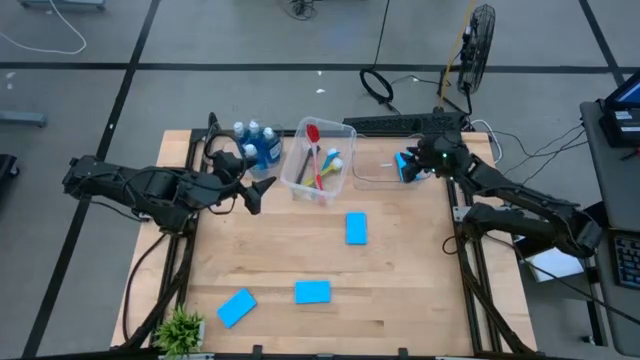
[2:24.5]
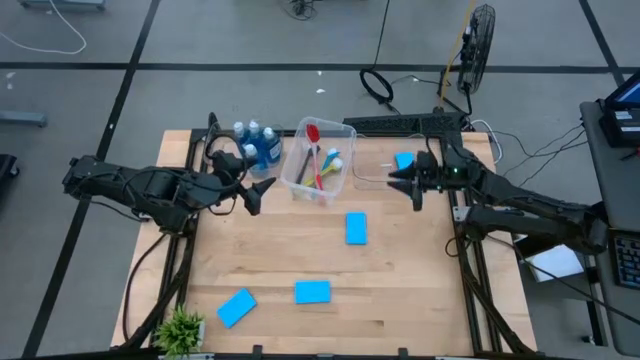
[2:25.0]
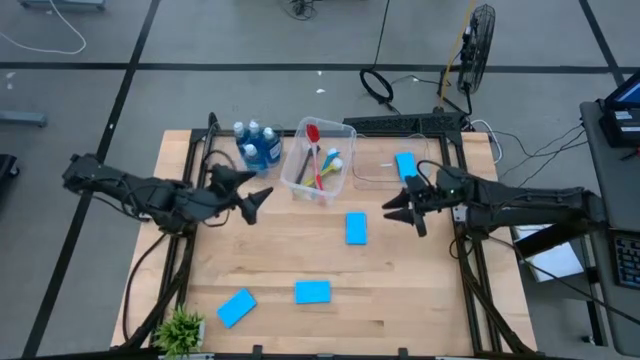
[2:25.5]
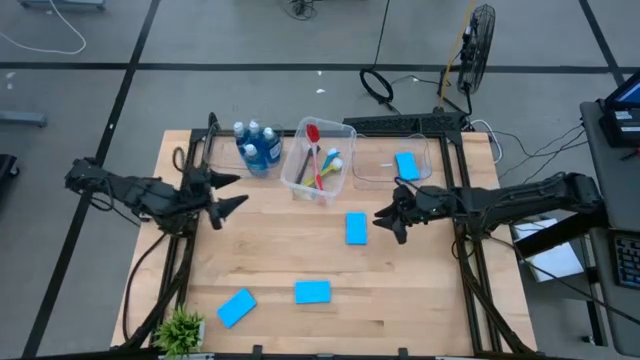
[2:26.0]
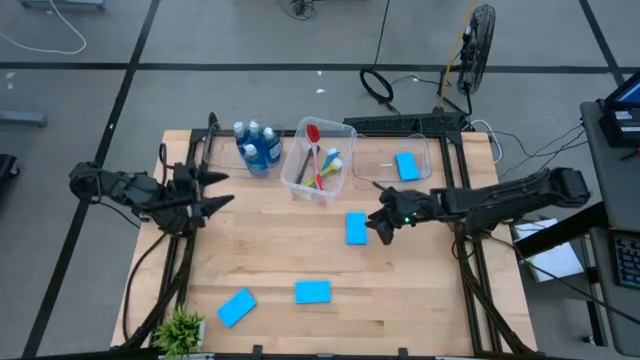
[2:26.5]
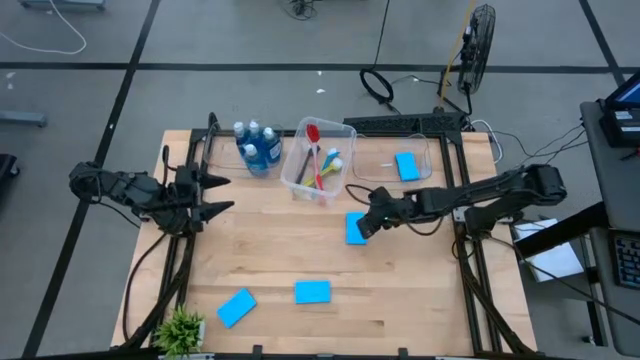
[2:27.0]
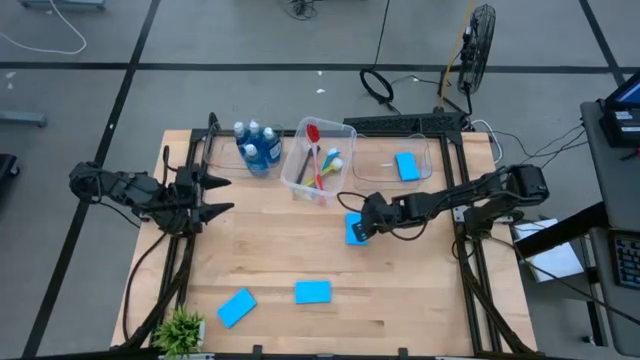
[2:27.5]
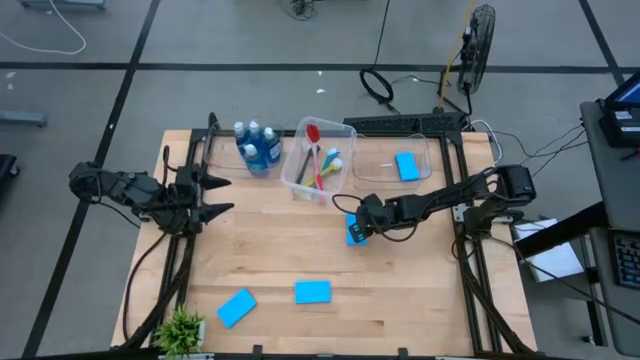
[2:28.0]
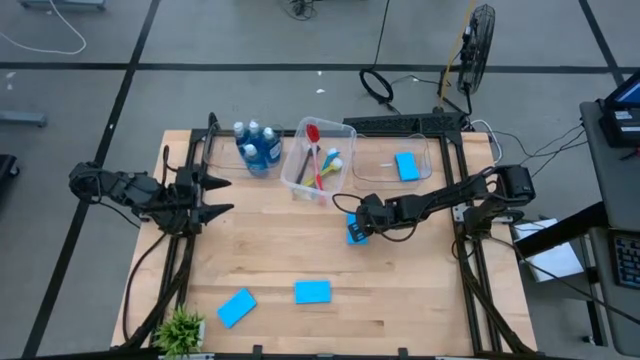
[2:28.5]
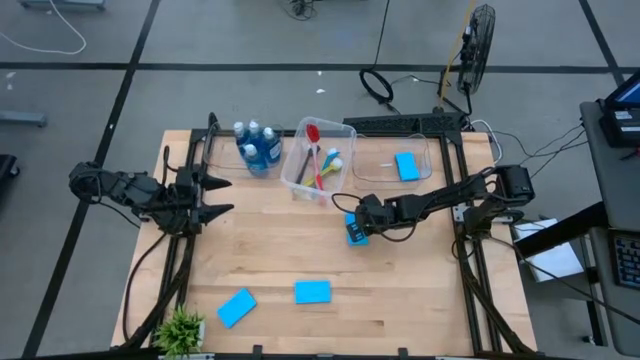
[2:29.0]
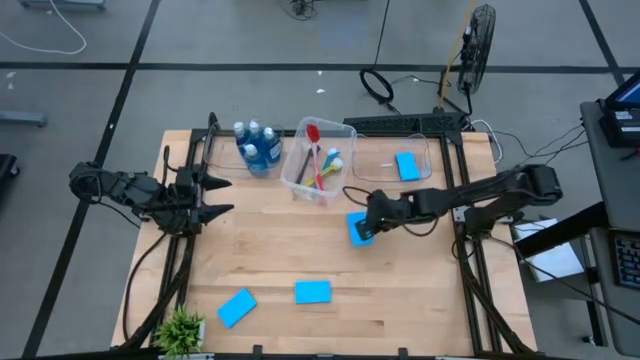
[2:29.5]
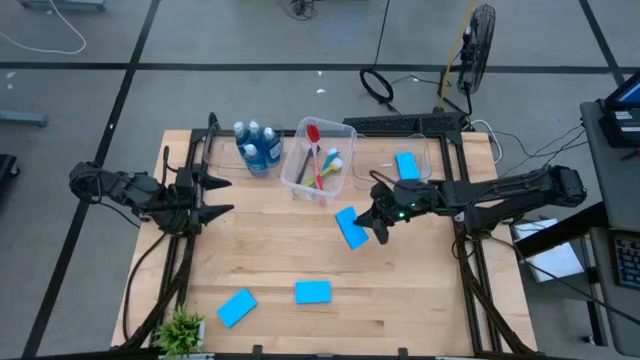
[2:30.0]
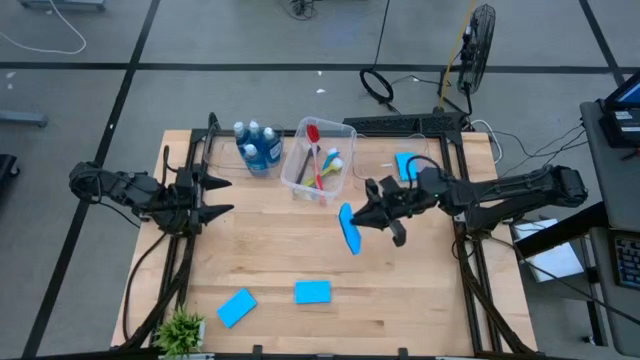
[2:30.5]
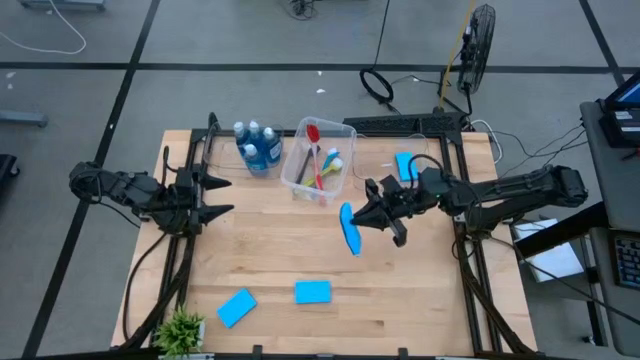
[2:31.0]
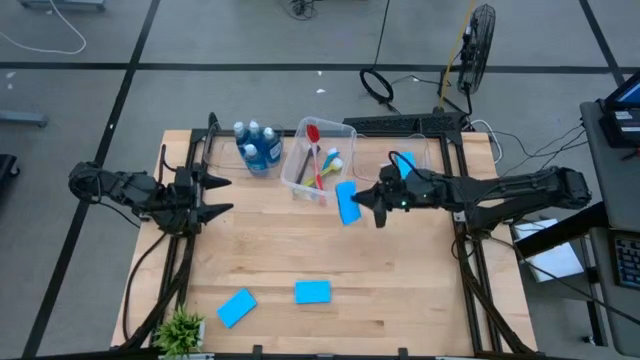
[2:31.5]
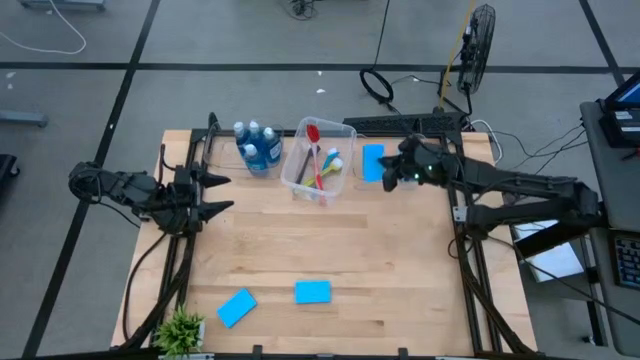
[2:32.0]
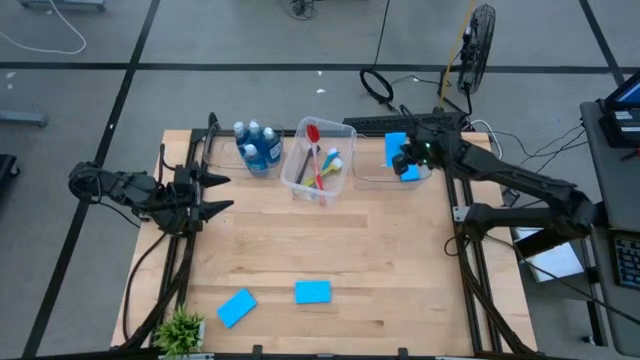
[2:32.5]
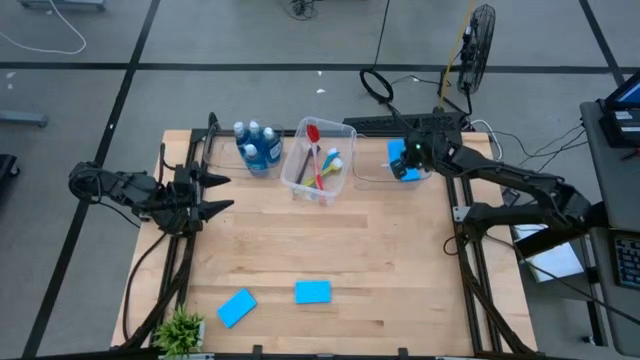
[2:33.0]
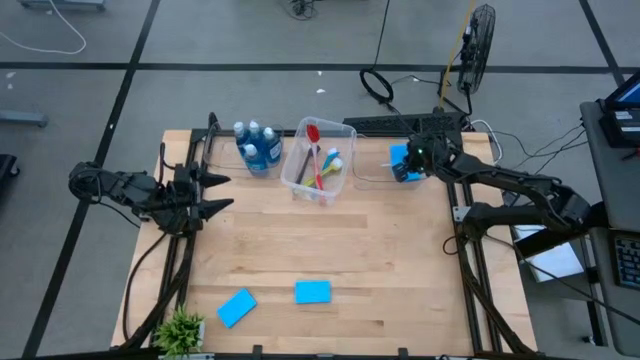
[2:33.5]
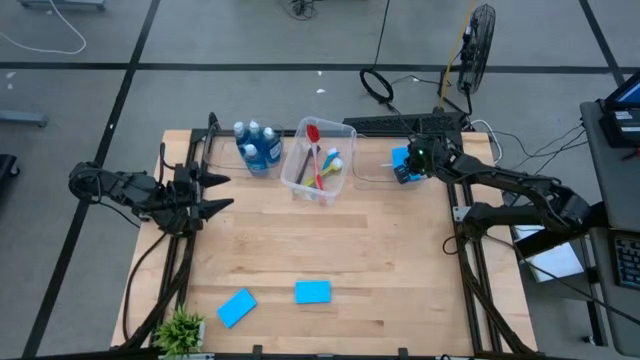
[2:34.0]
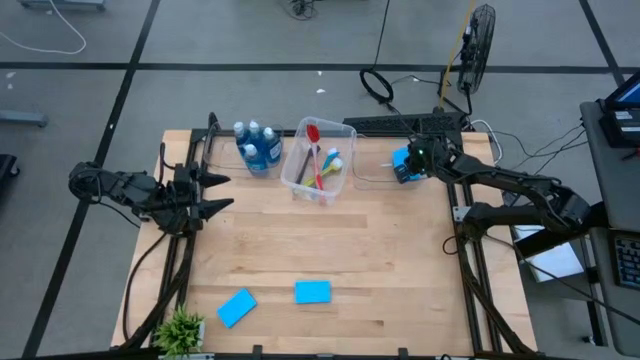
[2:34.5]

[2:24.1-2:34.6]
Task: Pick & Place Kitchen Sink Supplies
Put the blue sponge into the right transparent bin

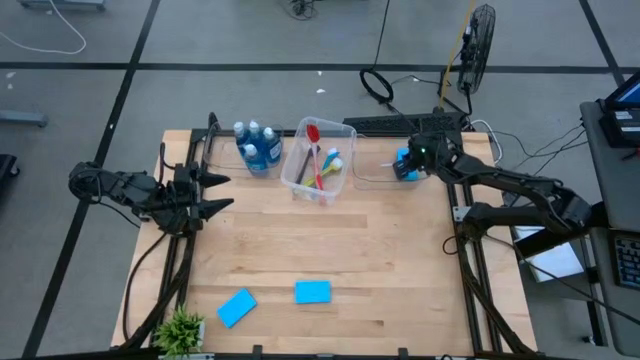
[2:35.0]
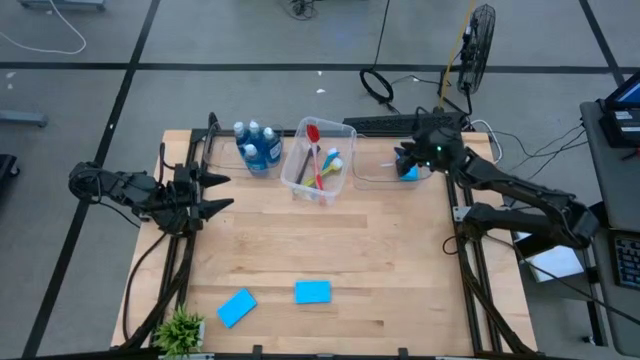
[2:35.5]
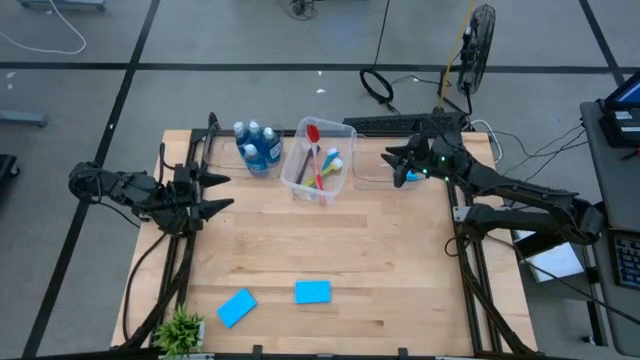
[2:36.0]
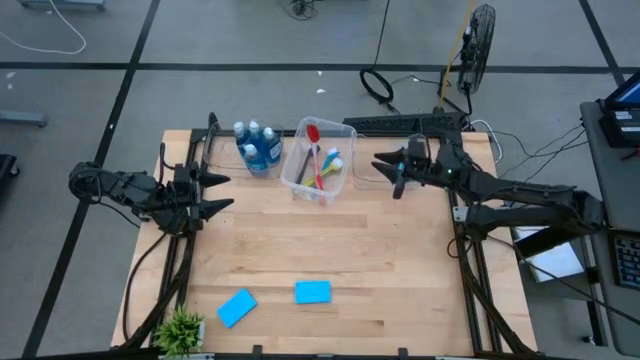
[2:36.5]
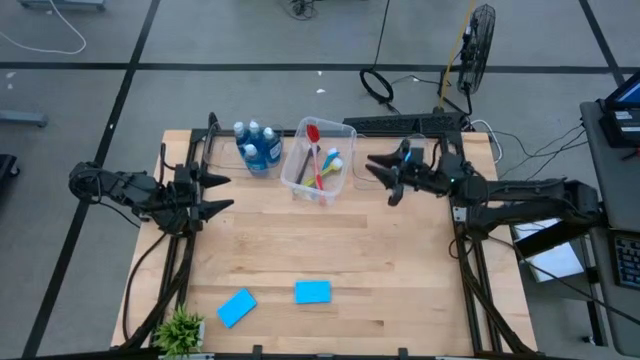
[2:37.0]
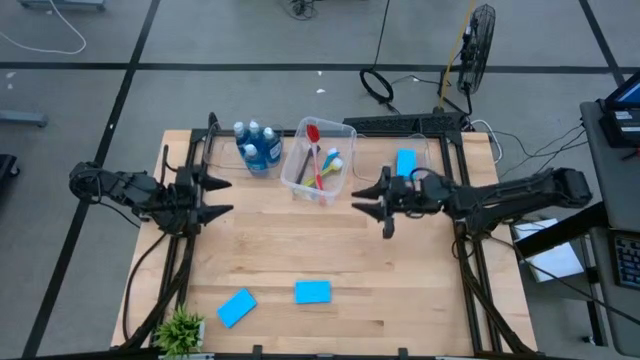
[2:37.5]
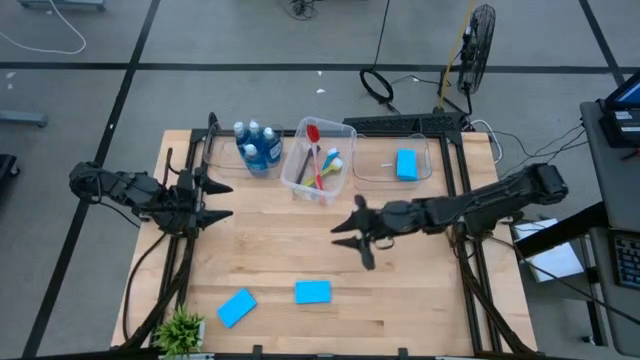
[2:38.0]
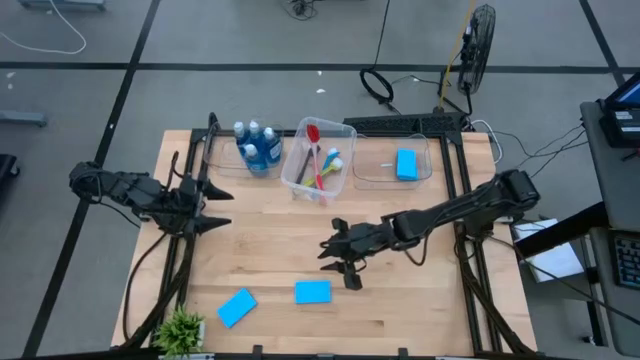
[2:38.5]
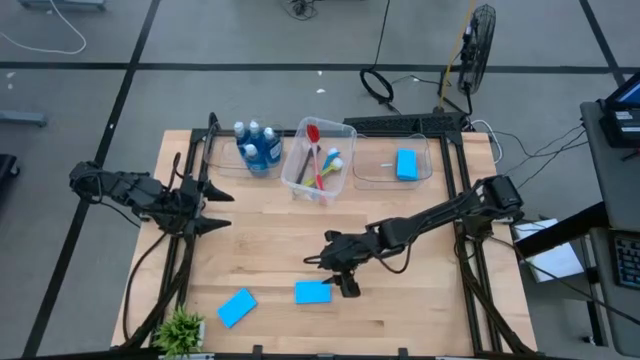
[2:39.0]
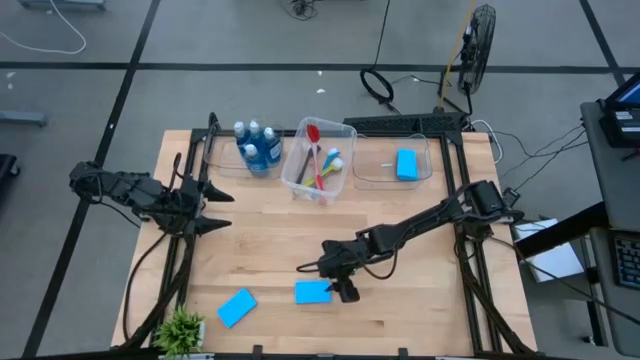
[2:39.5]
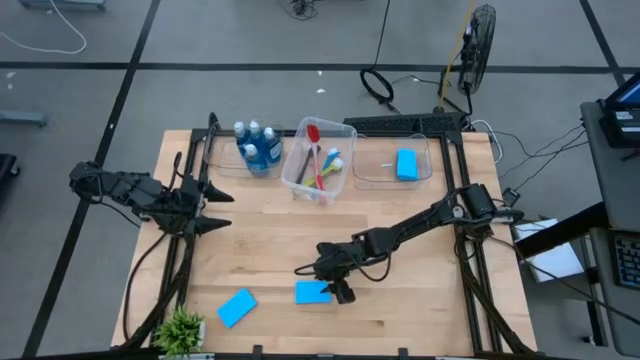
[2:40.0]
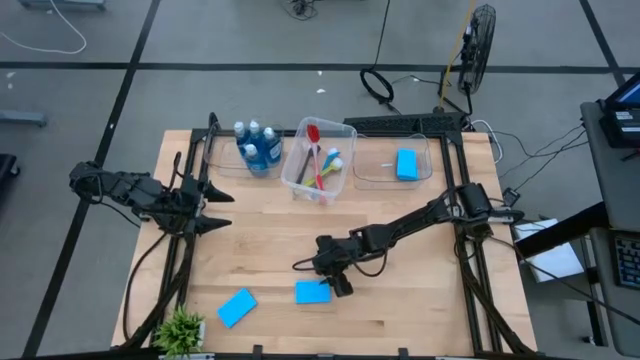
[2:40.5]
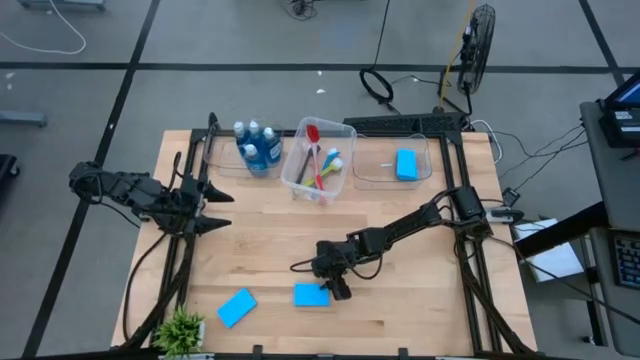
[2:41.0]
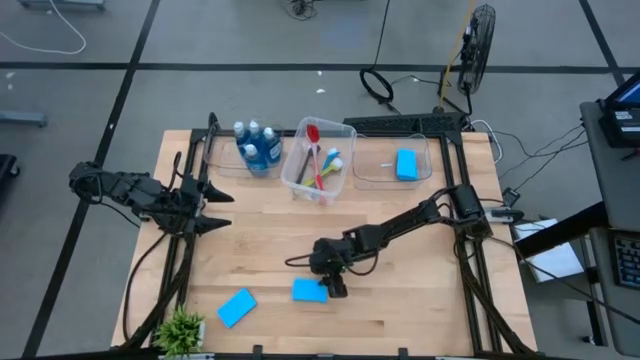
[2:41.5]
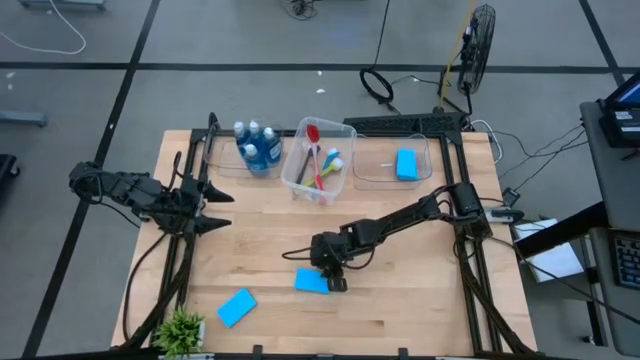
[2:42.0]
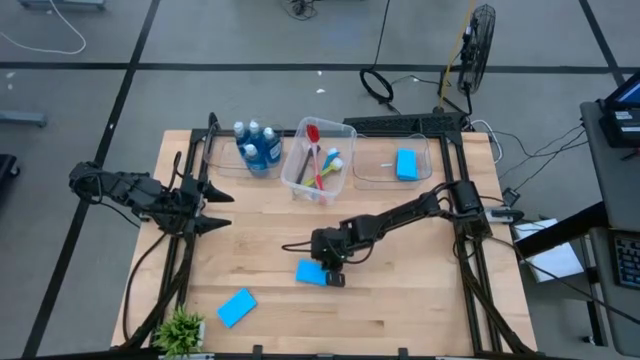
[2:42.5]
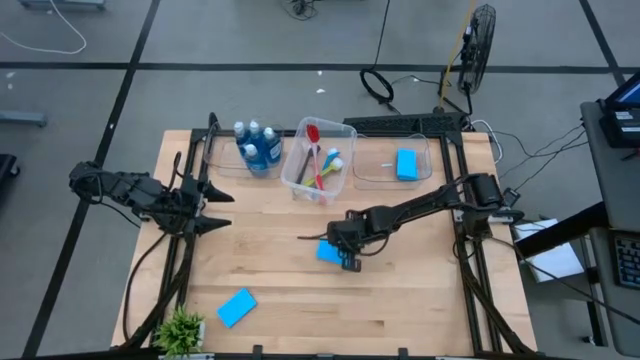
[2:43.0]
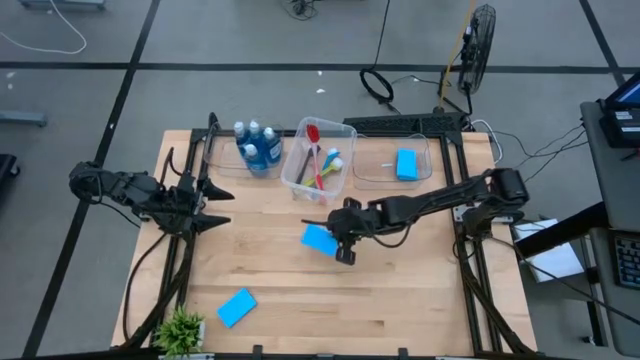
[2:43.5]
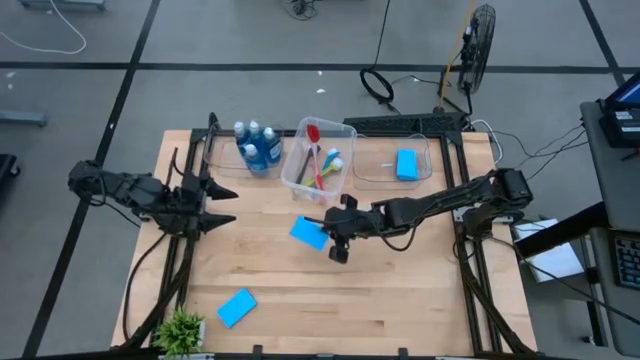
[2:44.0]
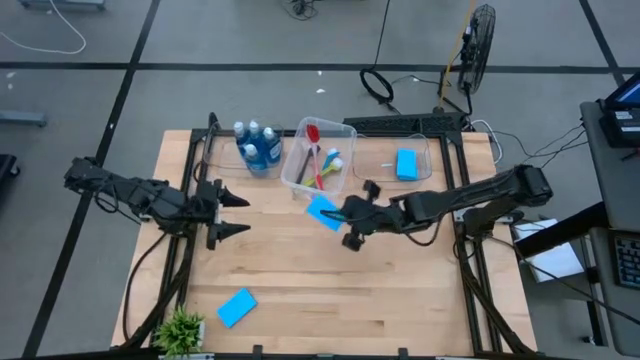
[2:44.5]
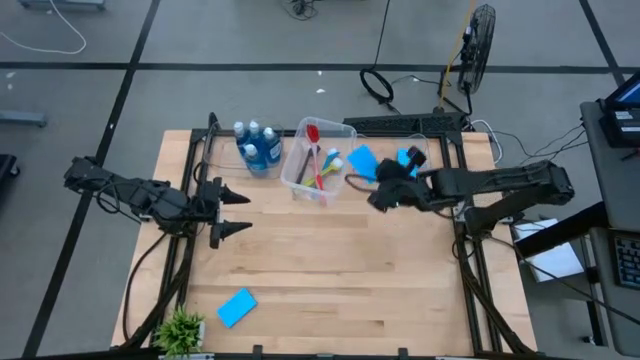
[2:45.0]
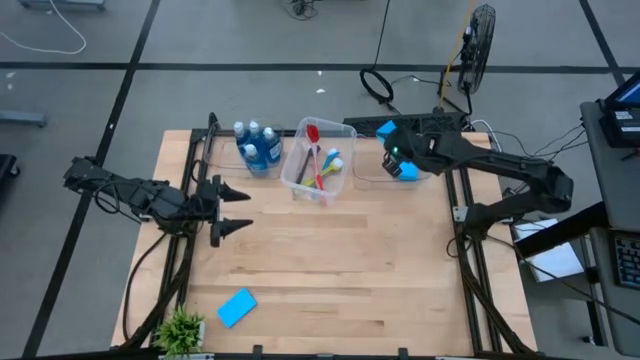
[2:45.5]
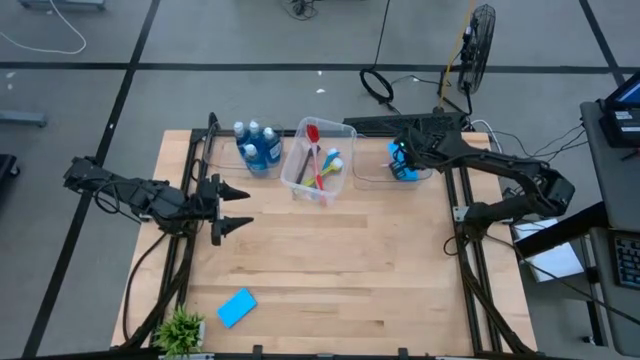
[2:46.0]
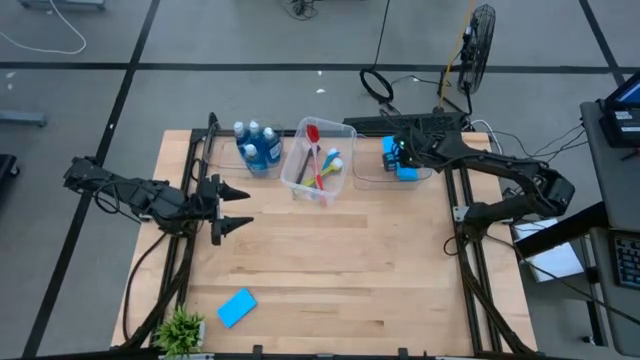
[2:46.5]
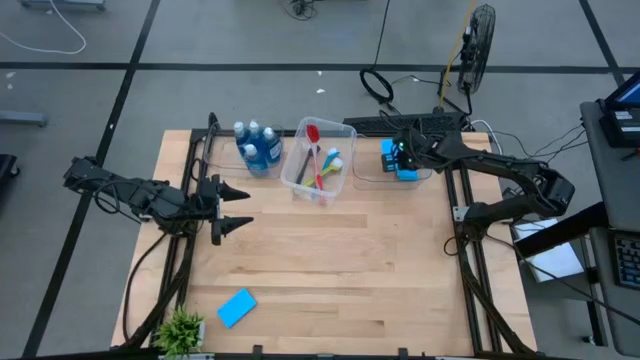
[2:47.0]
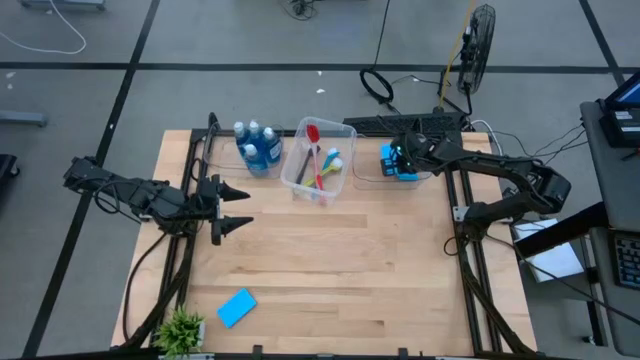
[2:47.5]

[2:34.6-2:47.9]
Put the blue sponge into the right transparent bin
